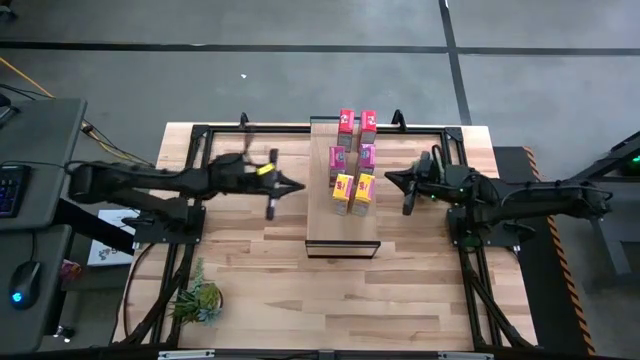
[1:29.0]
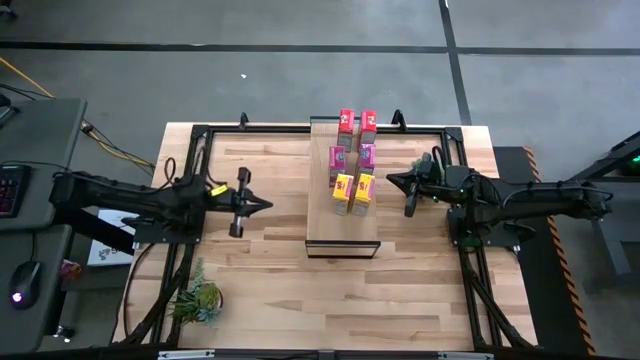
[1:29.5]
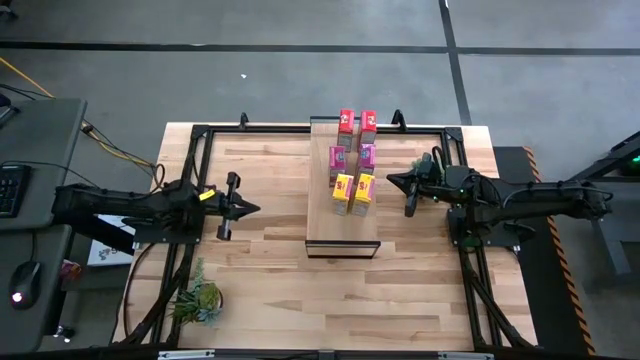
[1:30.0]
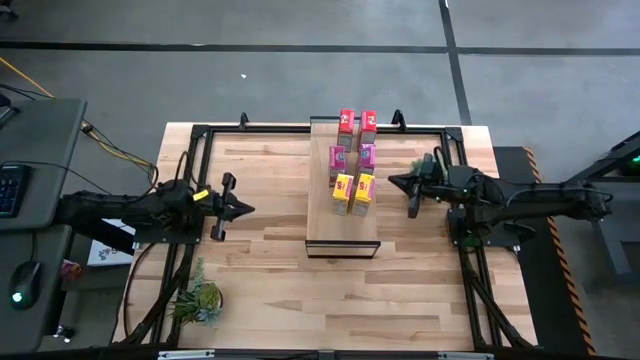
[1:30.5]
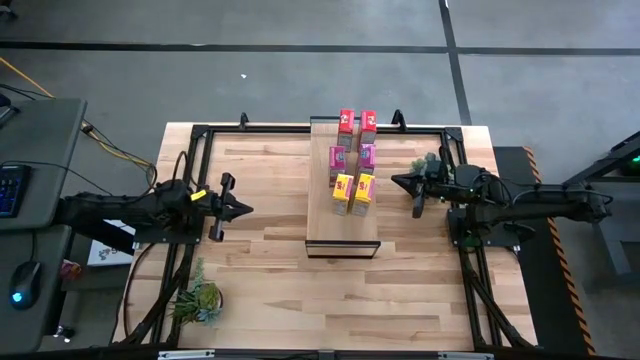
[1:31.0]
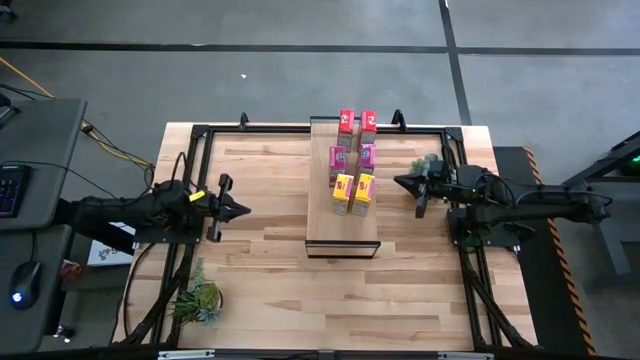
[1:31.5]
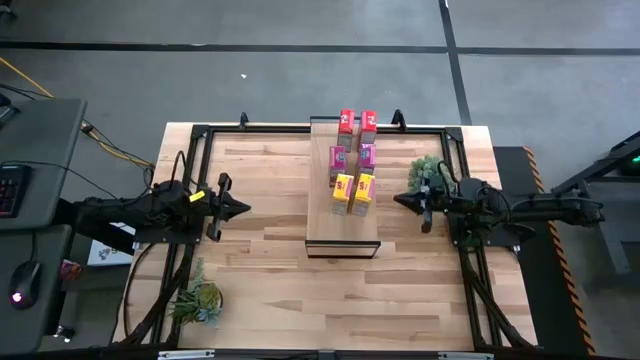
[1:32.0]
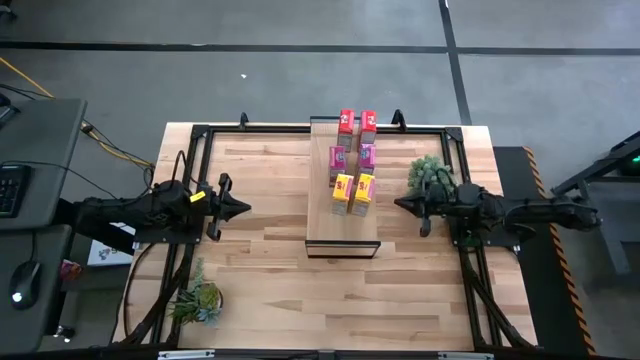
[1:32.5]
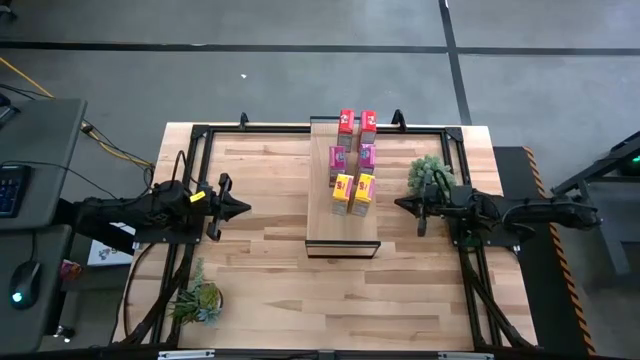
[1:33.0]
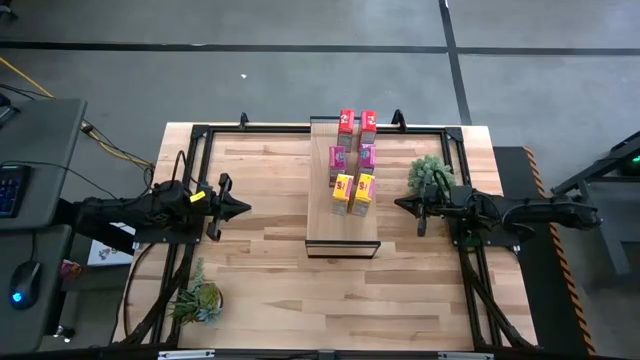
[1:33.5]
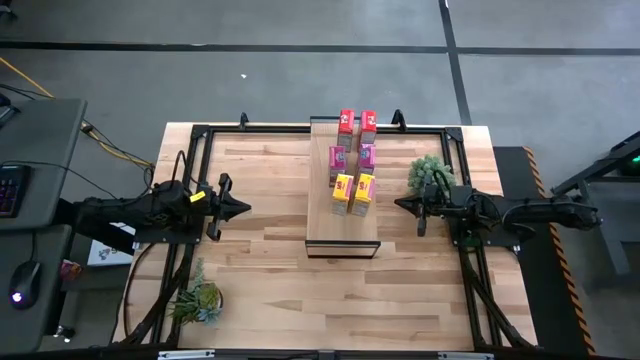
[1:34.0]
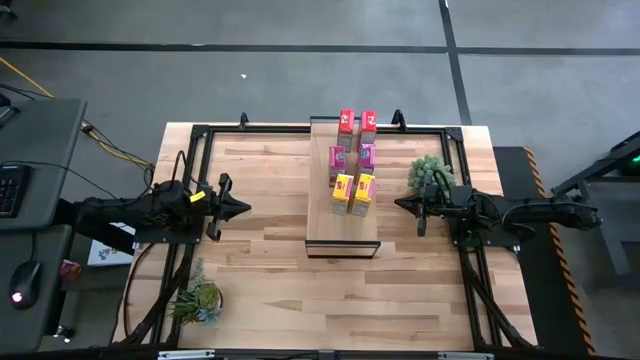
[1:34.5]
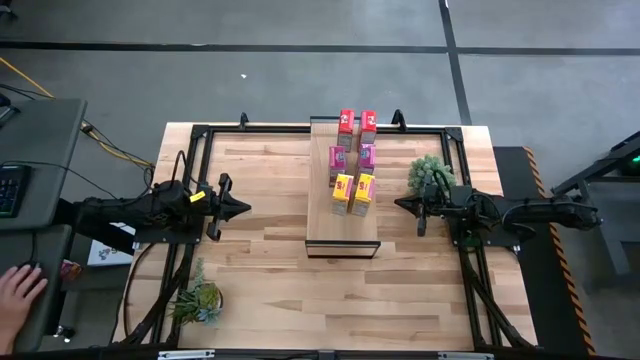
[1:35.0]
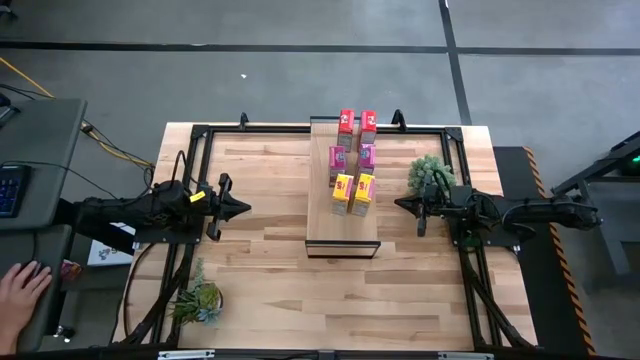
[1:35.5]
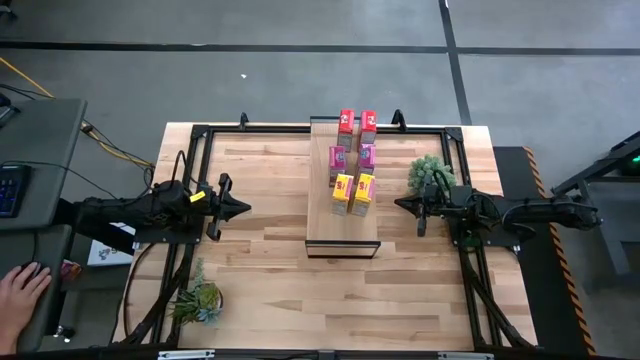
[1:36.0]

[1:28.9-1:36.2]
Task: Stack cereal on shelf
Return to Home Position

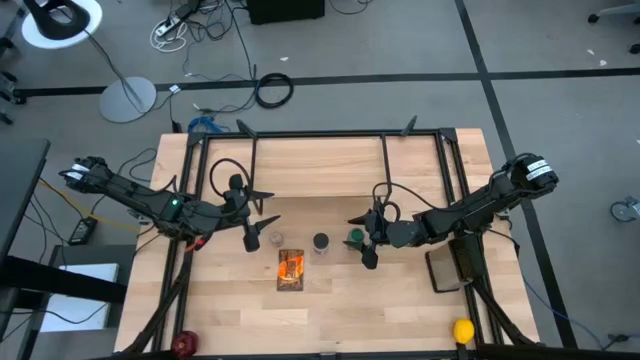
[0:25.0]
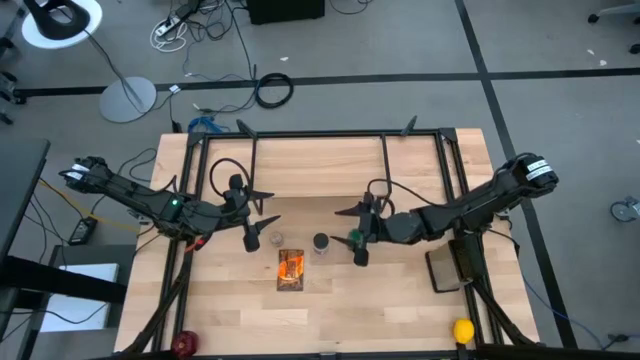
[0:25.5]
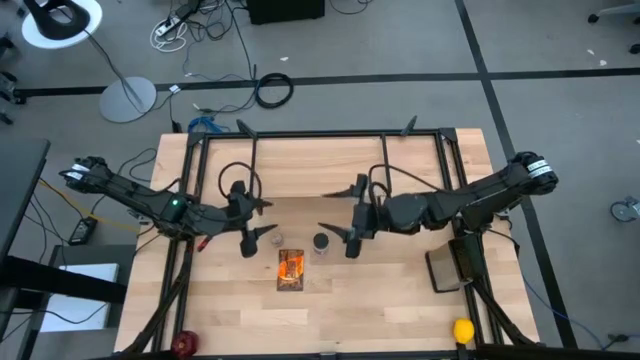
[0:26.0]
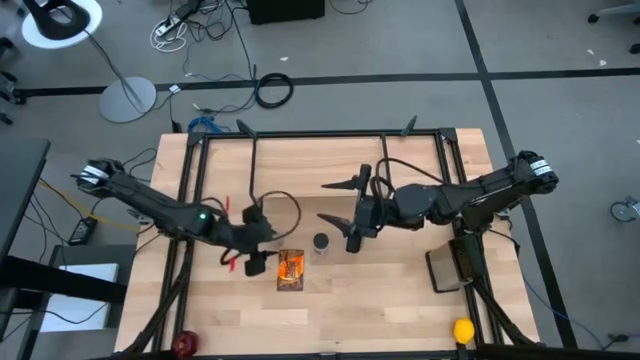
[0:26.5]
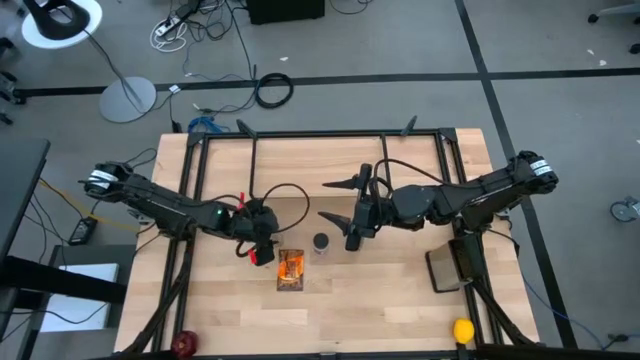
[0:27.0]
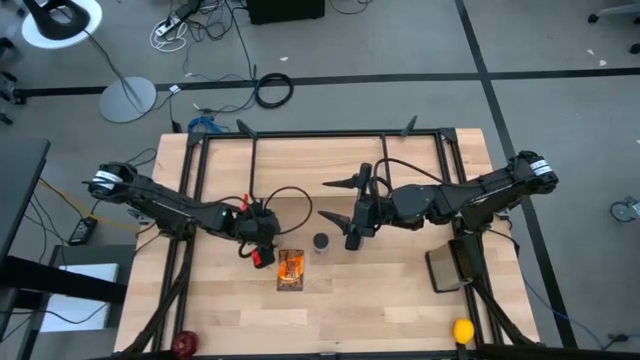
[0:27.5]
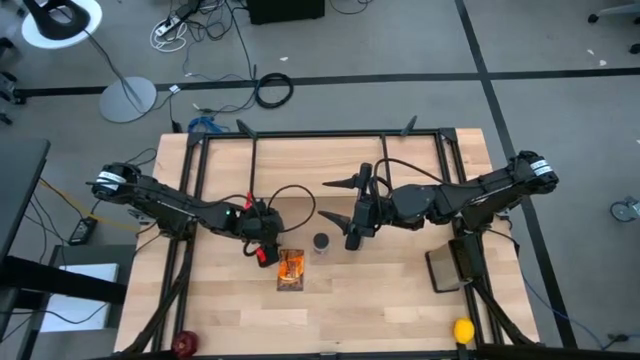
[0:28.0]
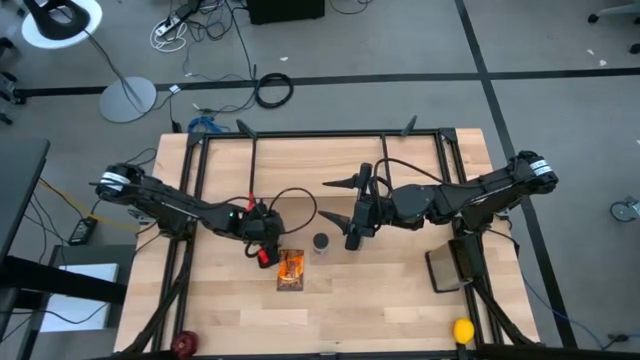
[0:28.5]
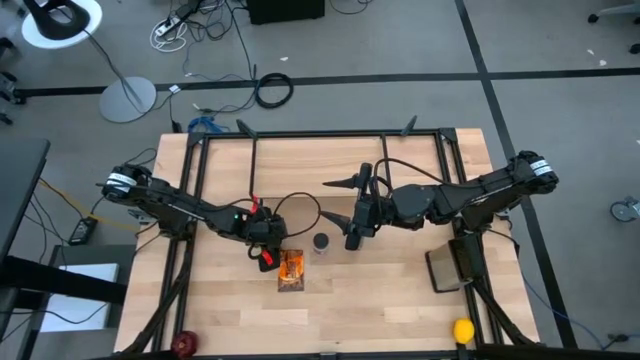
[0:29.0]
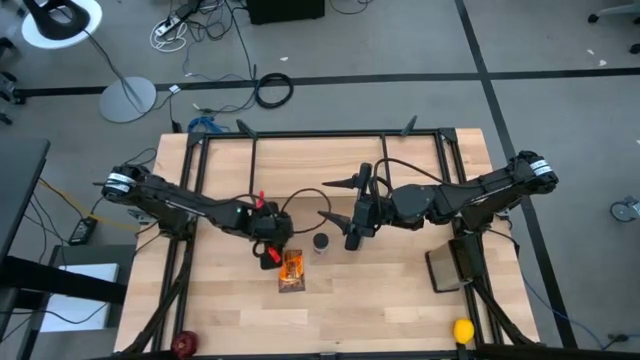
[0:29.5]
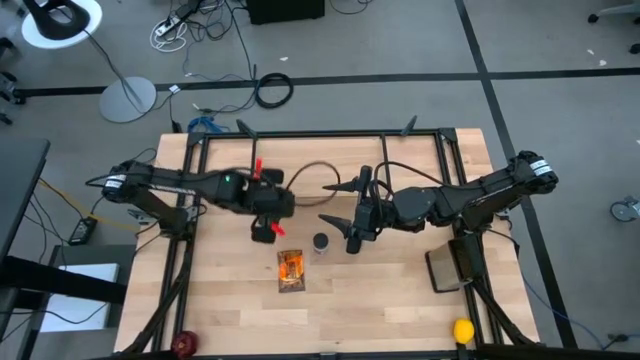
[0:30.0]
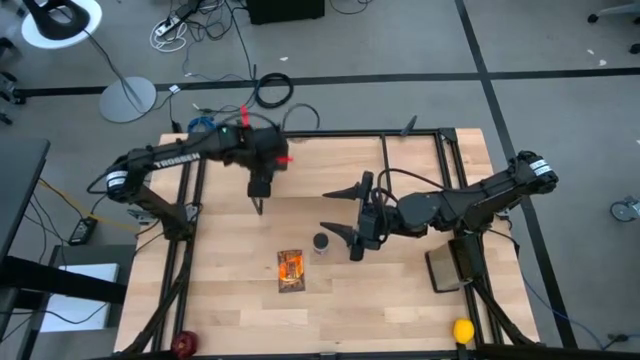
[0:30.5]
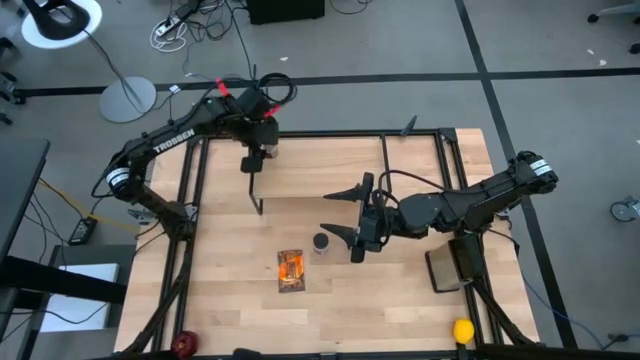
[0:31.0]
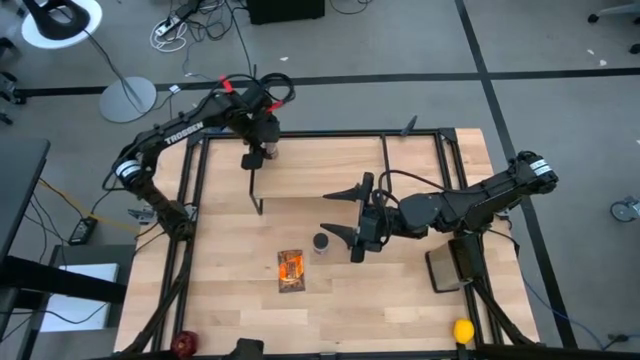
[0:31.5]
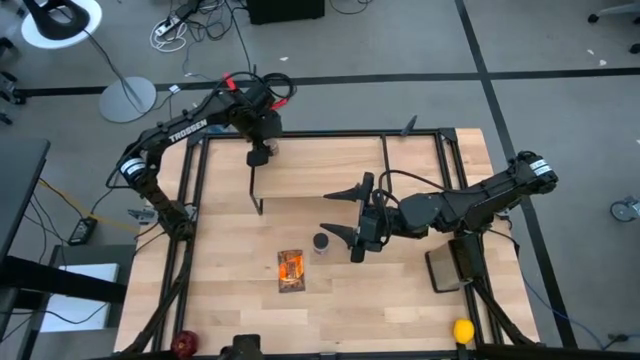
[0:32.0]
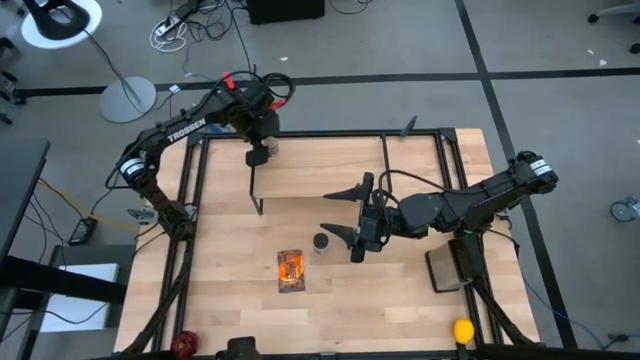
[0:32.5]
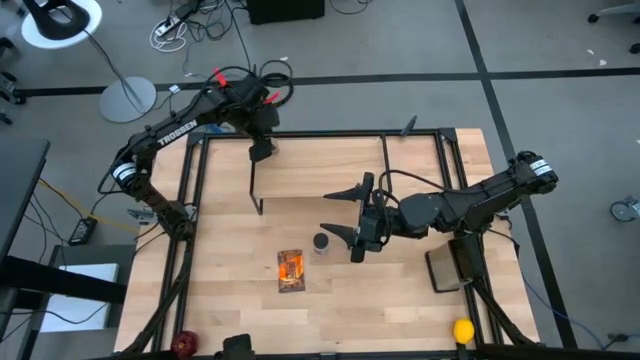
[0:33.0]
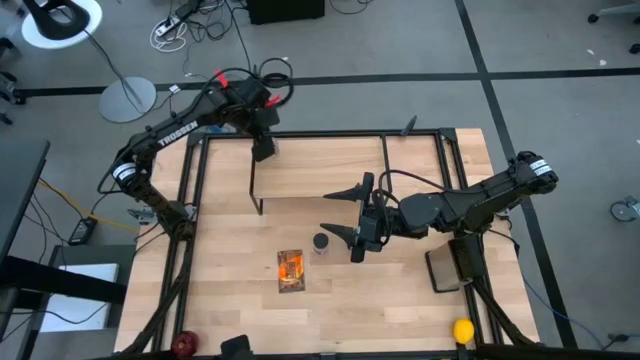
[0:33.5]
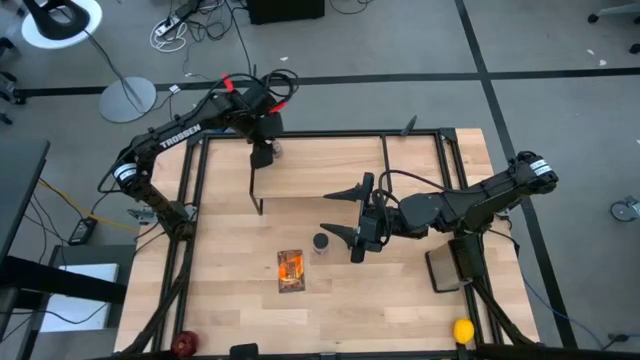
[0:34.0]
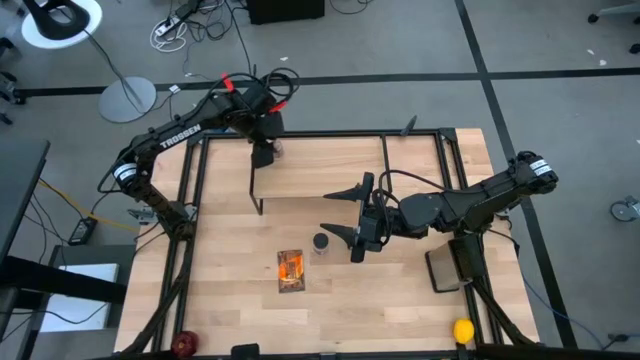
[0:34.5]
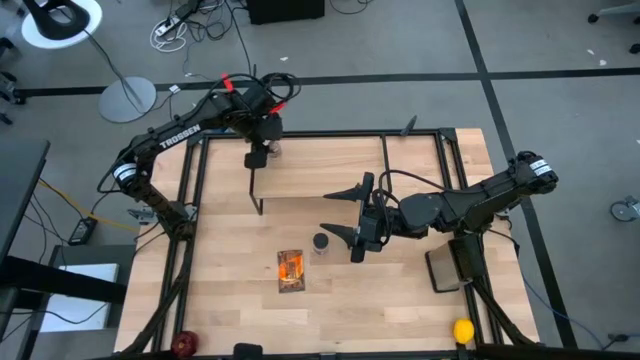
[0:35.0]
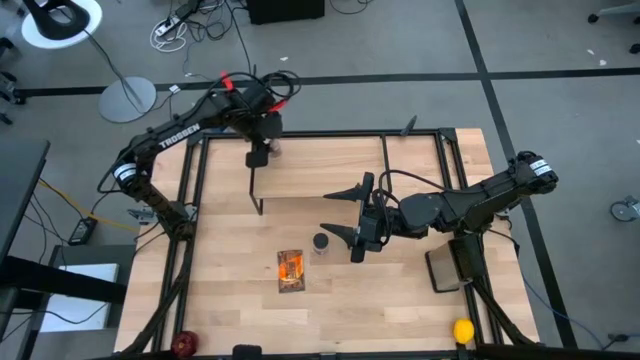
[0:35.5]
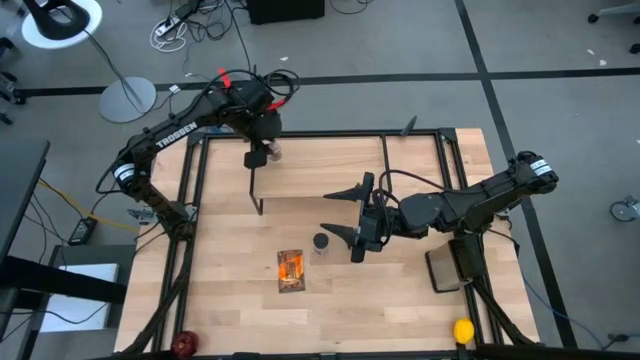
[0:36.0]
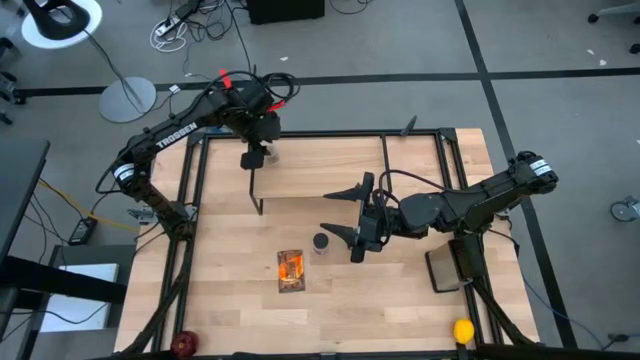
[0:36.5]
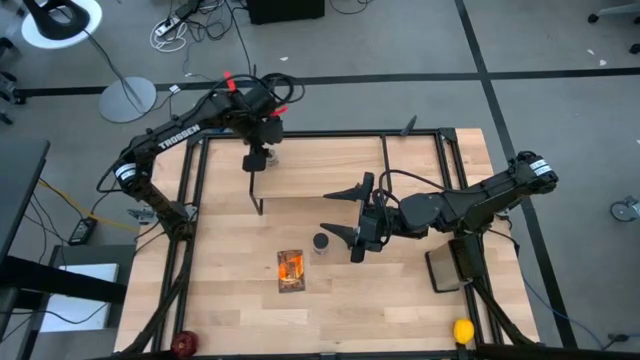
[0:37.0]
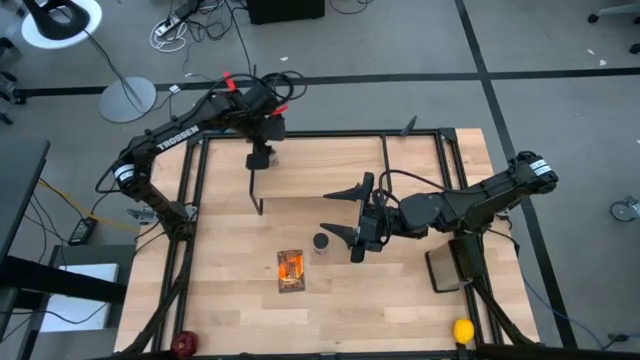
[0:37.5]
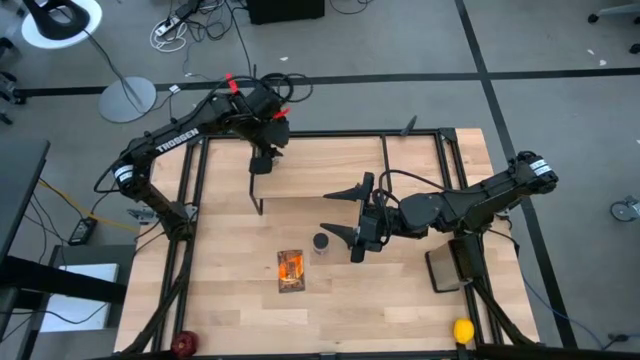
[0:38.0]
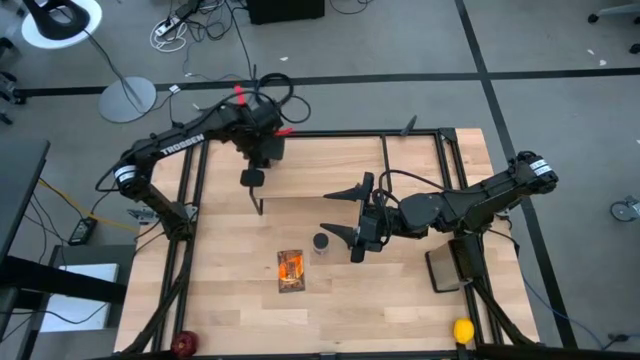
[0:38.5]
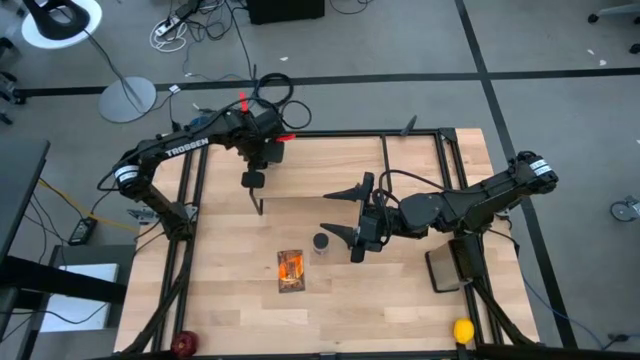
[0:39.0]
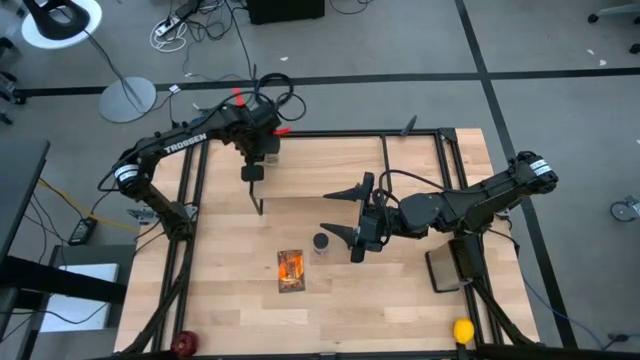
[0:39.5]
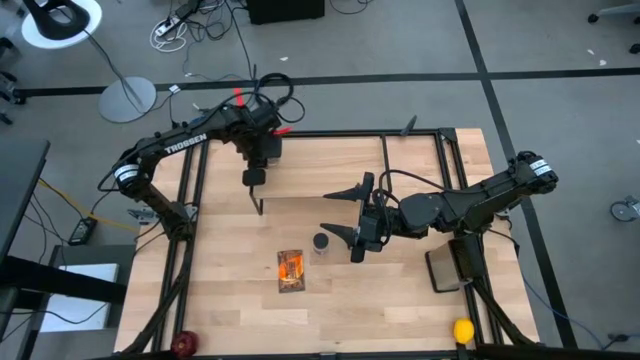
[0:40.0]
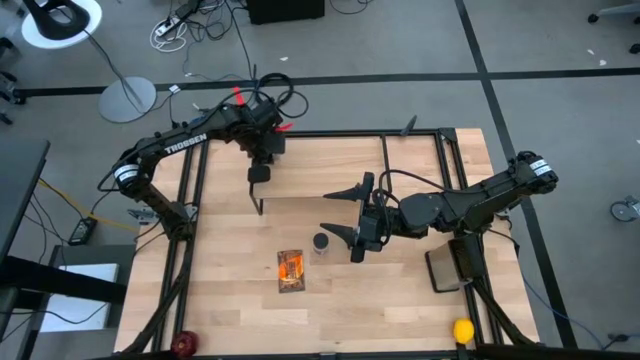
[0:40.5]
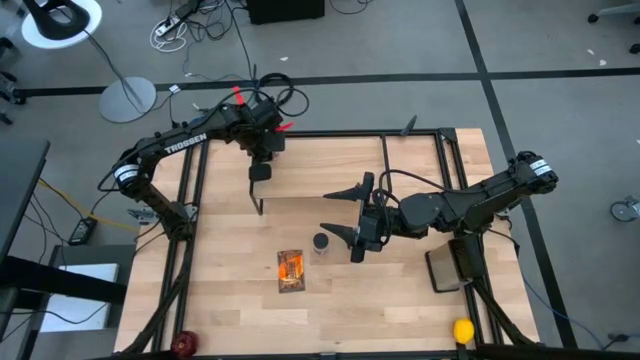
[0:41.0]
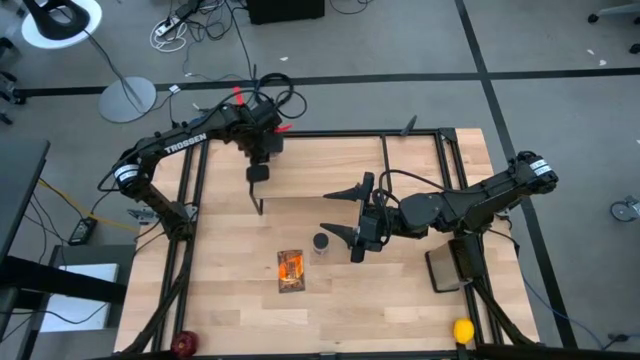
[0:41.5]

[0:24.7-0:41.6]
Task: Shelf spices
Put the brown seasoning bottle on the shelf
